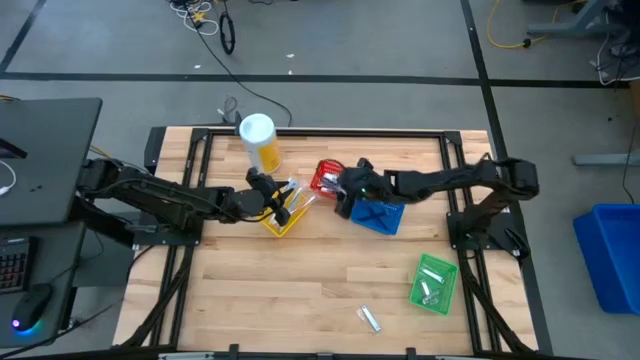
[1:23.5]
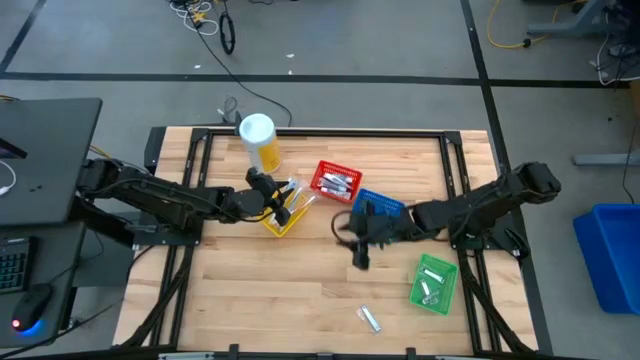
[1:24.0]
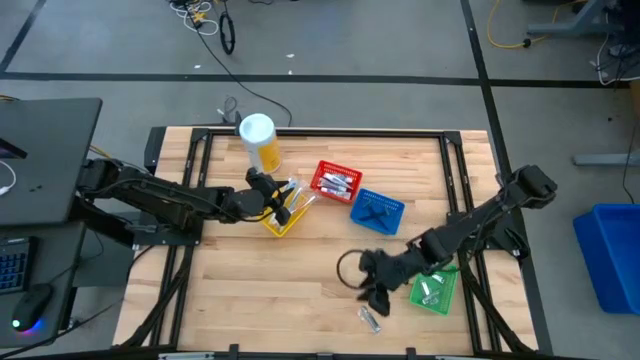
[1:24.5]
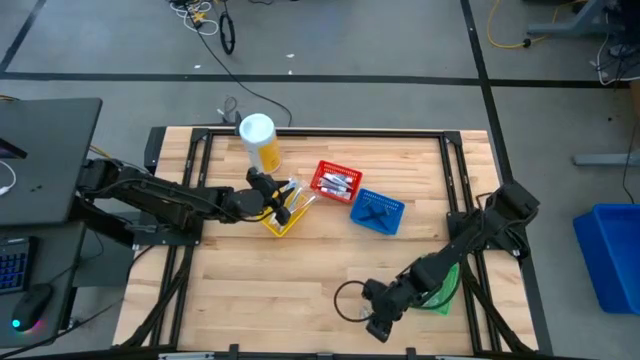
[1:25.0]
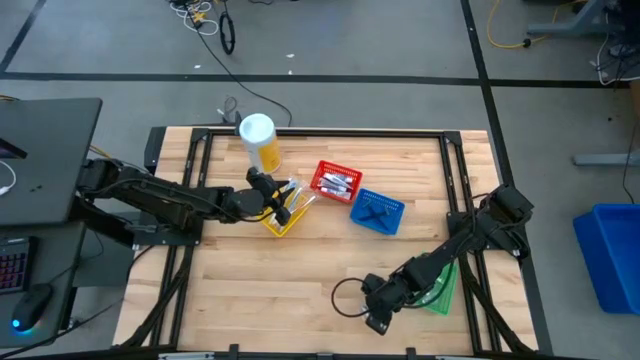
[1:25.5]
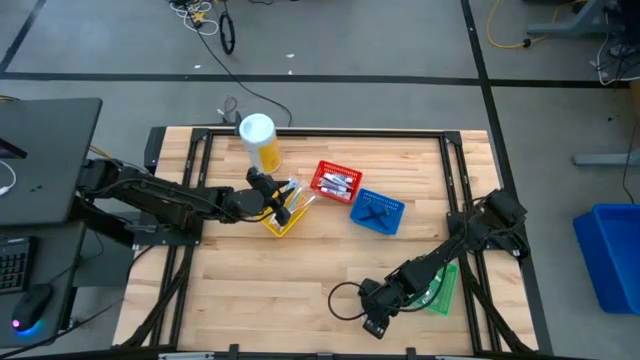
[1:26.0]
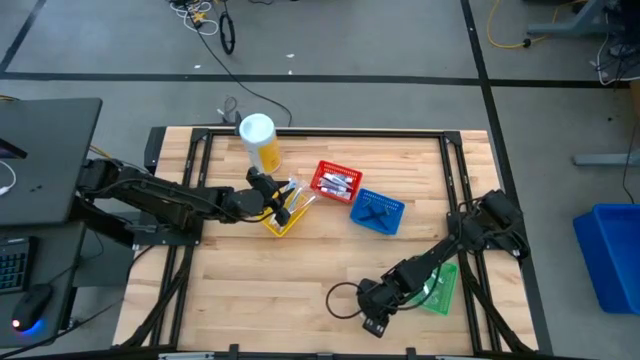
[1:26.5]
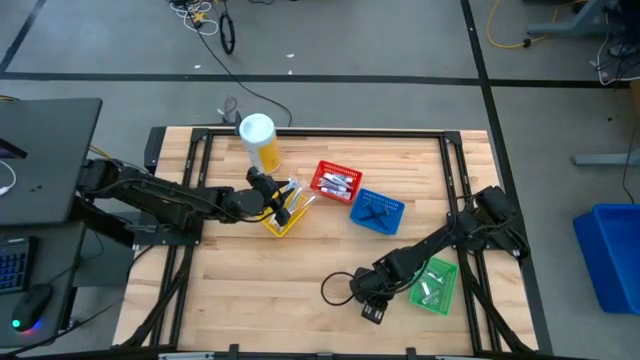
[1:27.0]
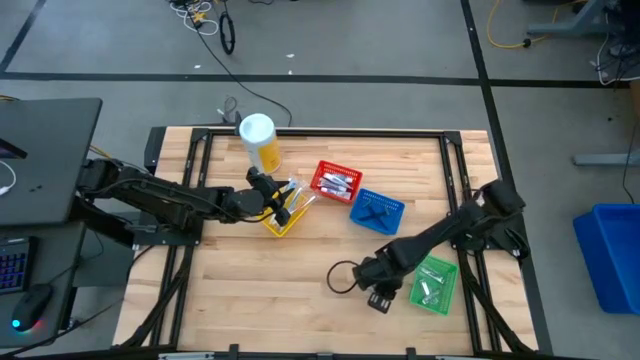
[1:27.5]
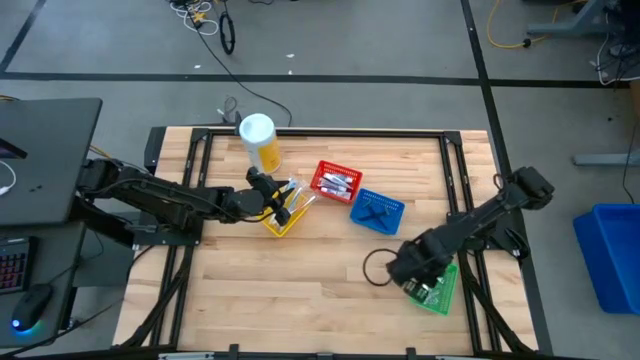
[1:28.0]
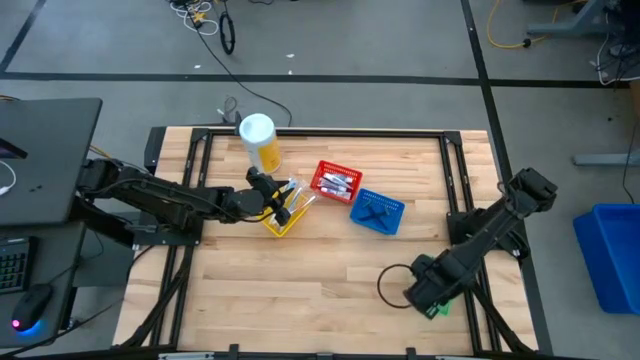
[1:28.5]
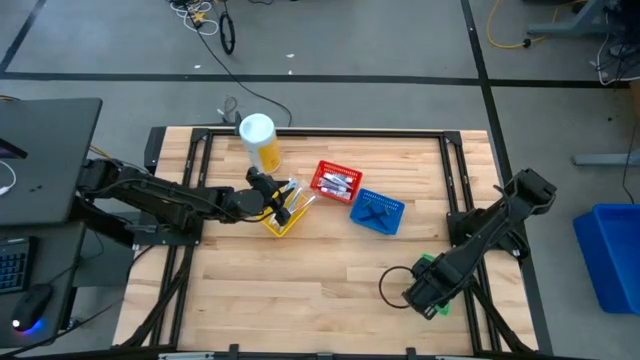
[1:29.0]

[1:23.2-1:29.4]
Task: Pick & Place Travel size toiletries
Put the silver nail cutter into the green bin

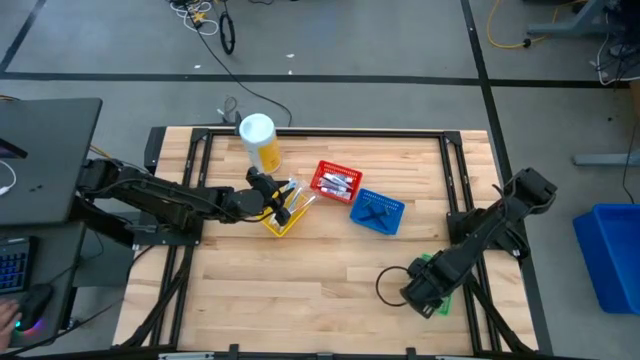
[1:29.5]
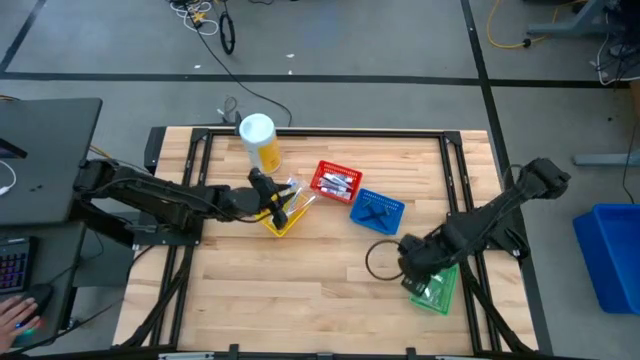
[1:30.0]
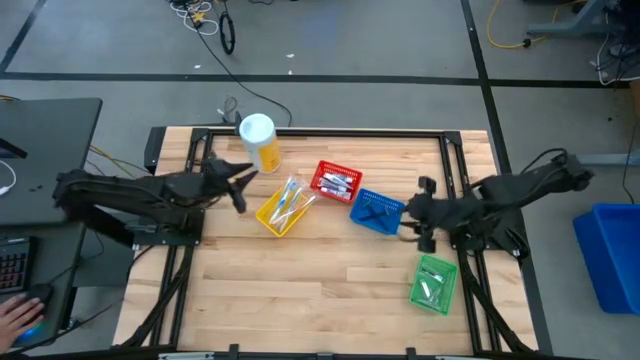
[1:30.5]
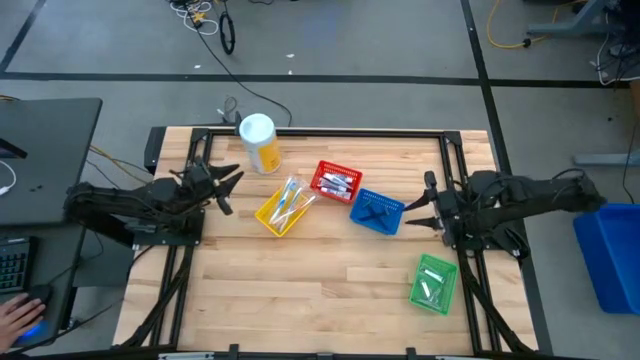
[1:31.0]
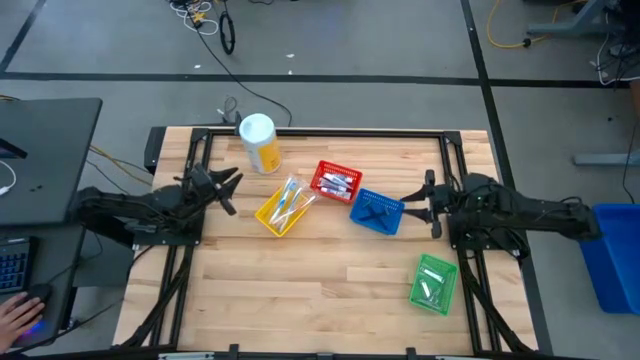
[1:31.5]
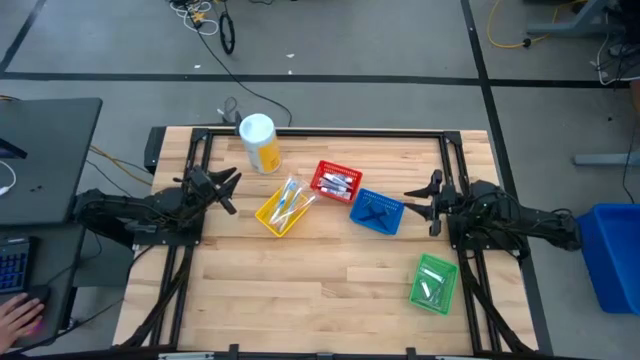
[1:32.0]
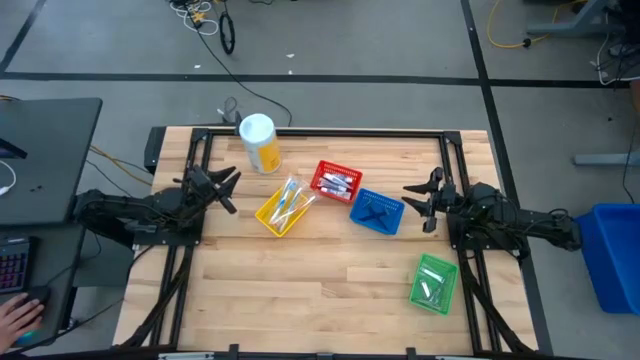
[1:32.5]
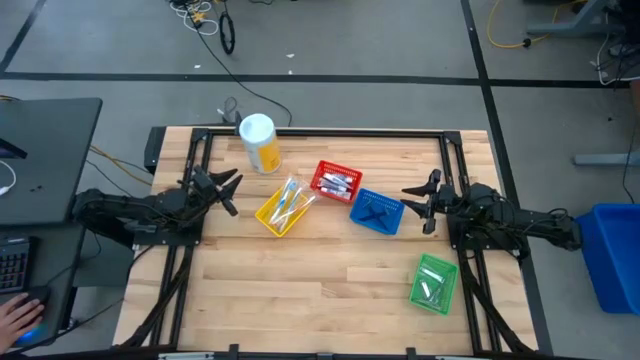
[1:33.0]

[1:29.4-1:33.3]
Return to Home Position

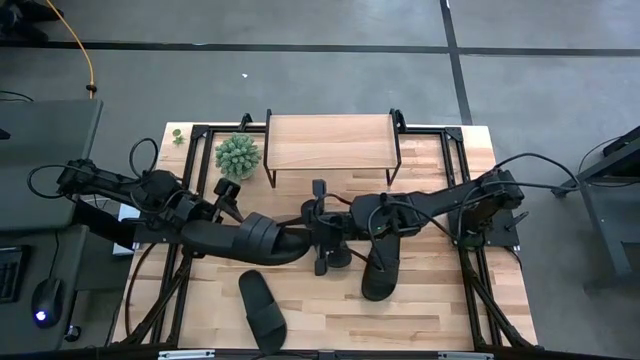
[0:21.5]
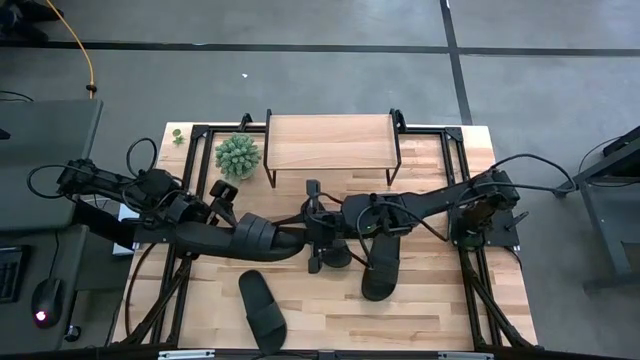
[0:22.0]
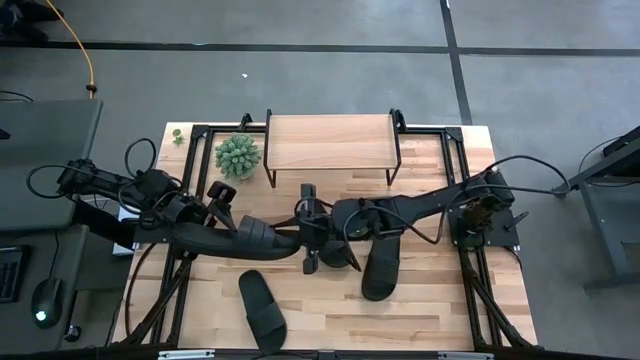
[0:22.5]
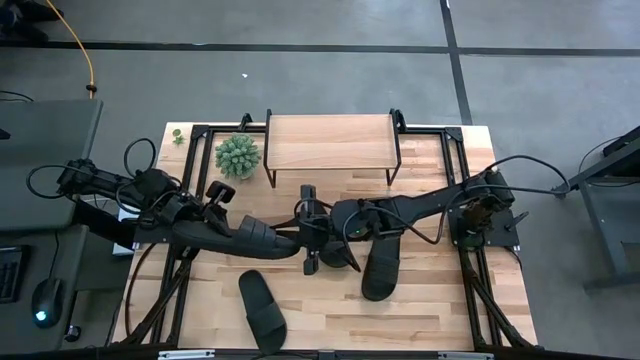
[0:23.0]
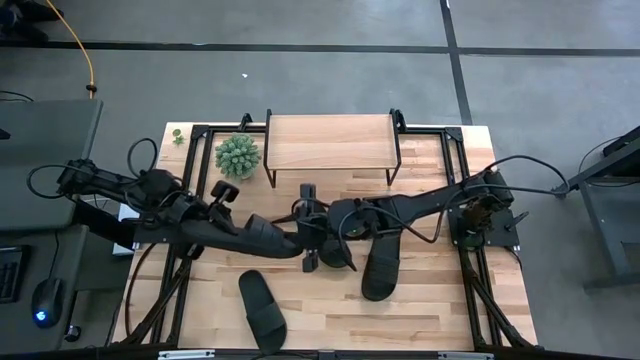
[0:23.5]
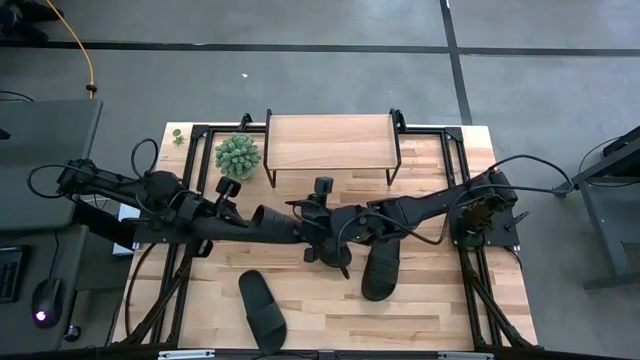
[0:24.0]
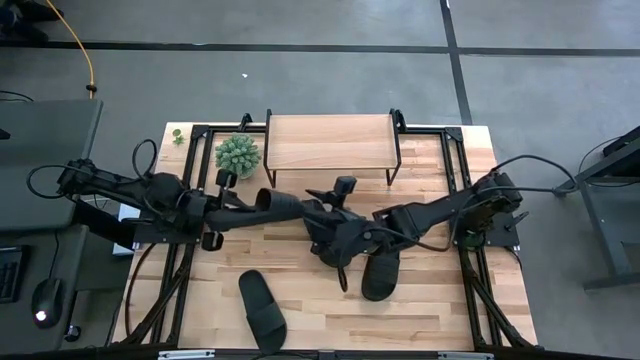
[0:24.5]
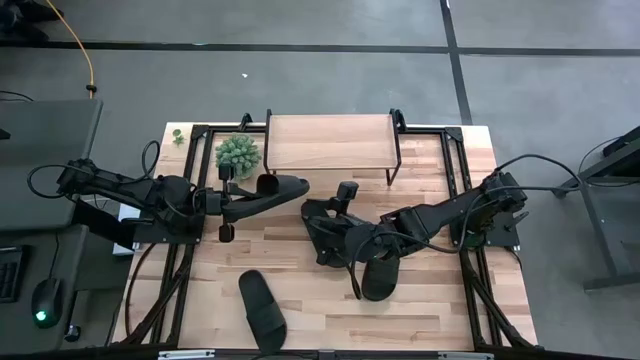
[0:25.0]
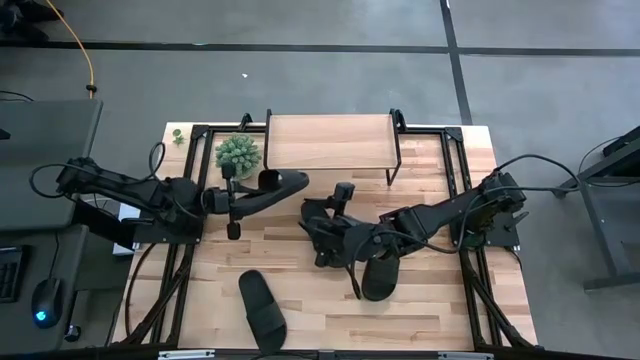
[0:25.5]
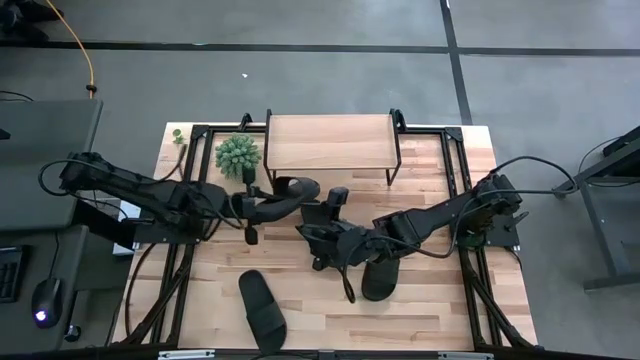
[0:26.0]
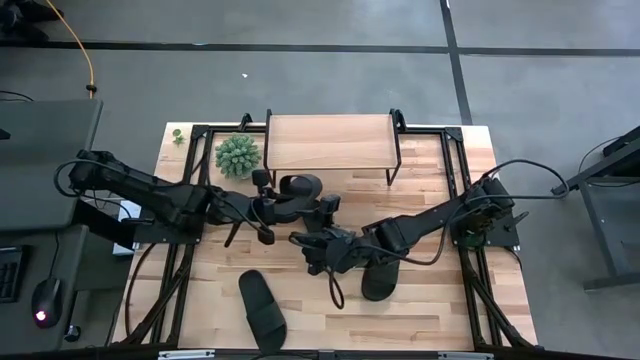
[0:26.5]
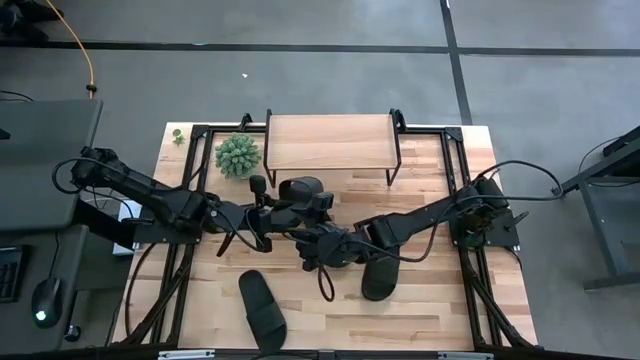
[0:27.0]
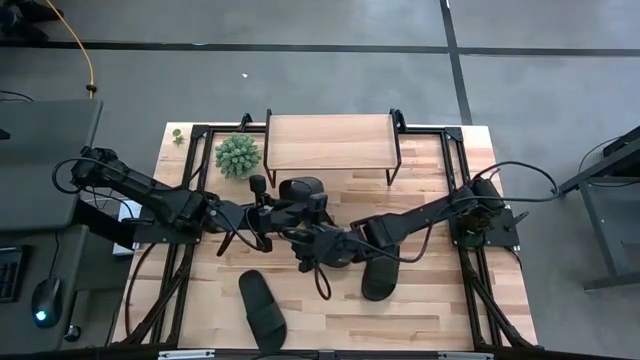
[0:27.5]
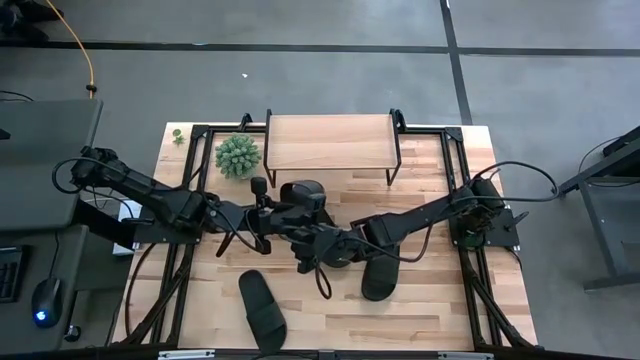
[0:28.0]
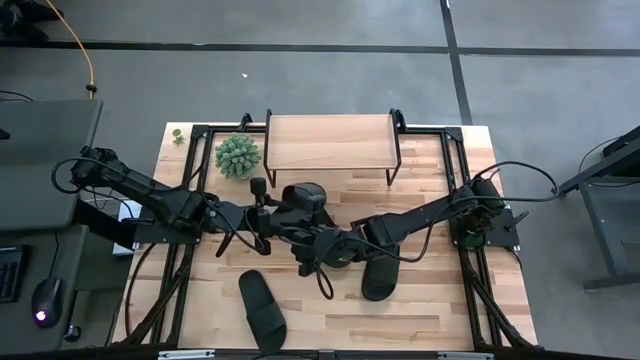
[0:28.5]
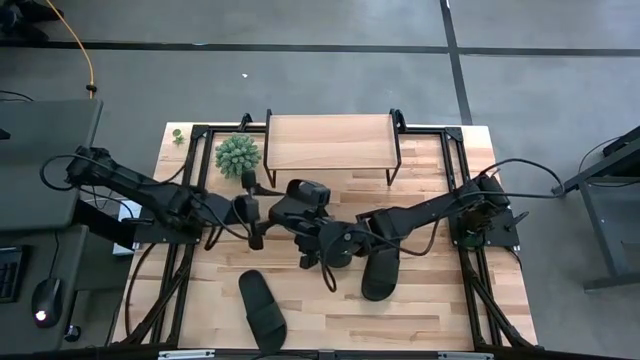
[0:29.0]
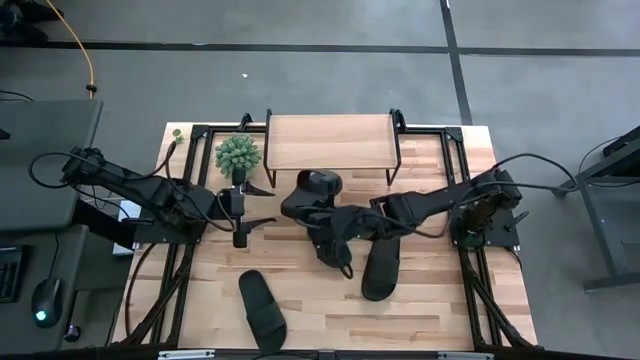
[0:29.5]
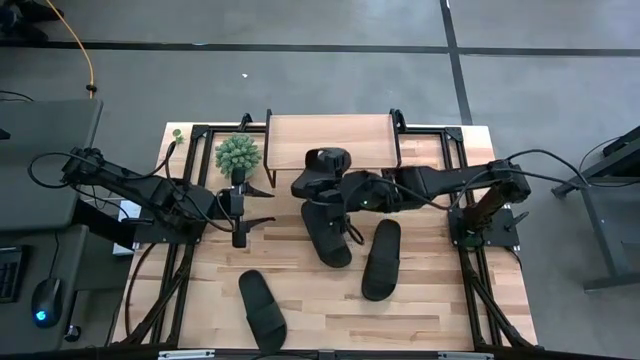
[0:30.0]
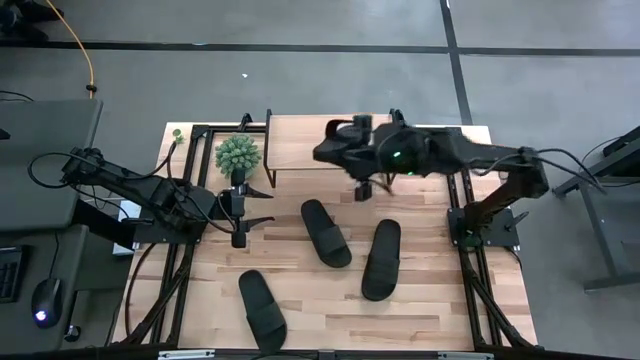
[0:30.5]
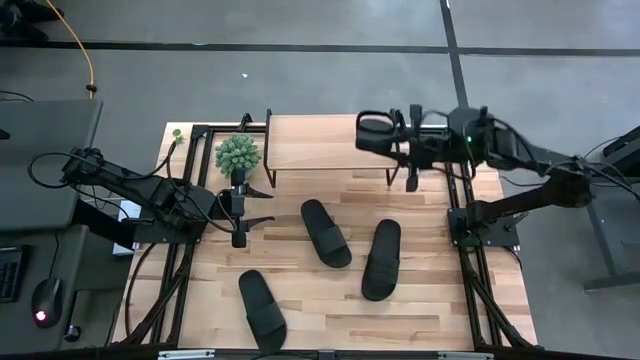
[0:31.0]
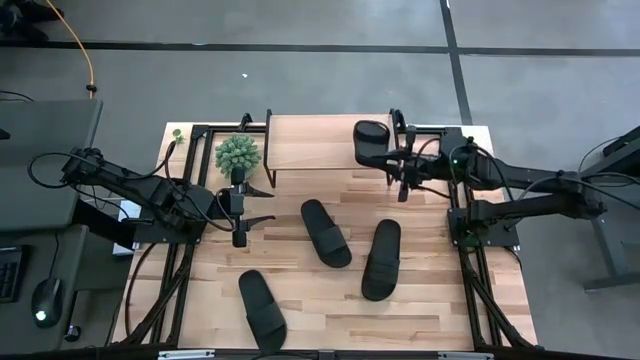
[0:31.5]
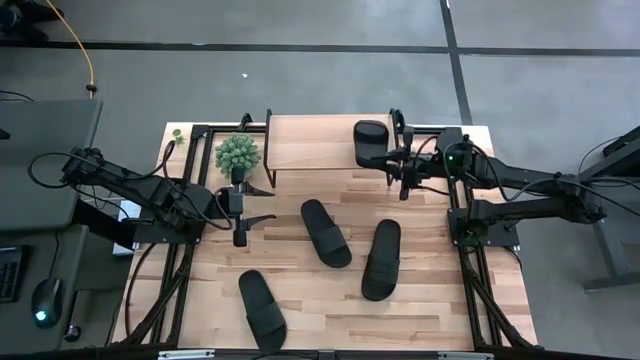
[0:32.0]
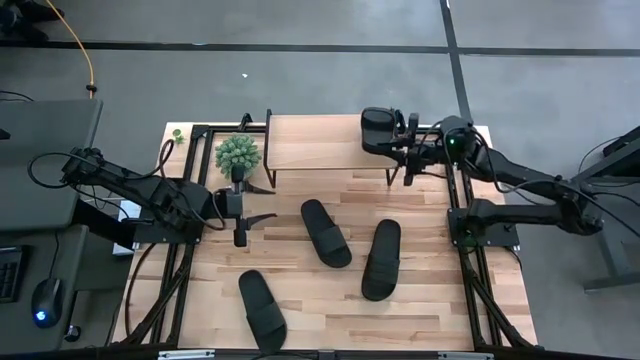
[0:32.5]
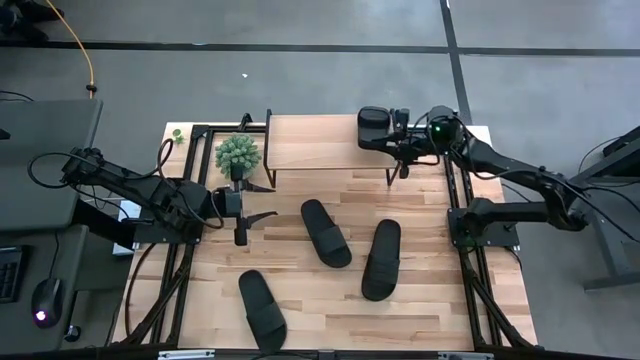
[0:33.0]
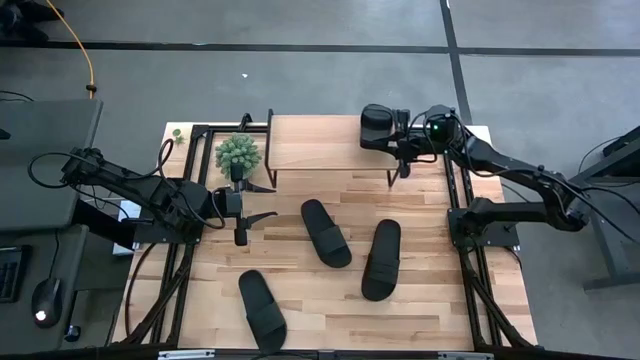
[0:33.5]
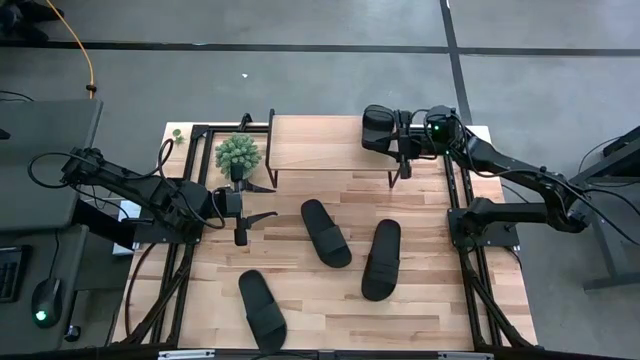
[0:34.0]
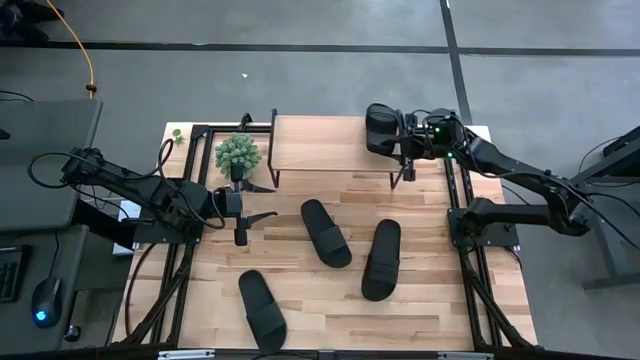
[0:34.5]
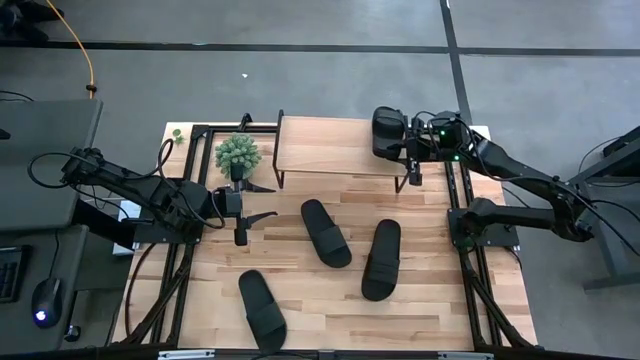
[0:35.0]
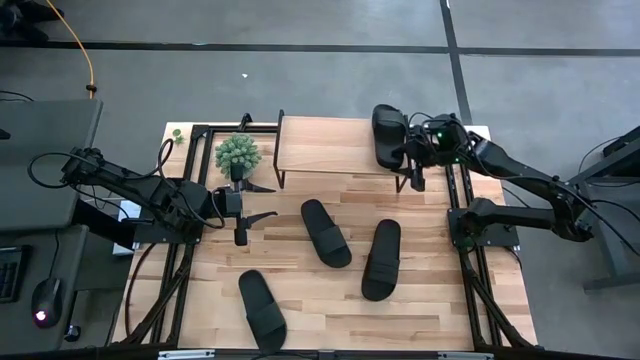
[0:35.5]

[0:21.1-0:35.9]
Task: Pick and place slides into the shelf
Put the black slide on the shelf
